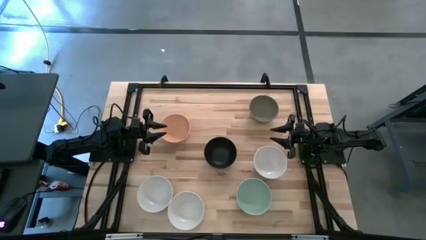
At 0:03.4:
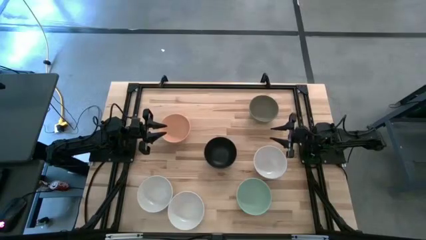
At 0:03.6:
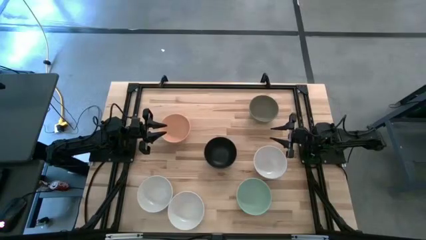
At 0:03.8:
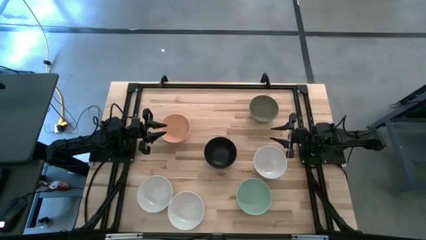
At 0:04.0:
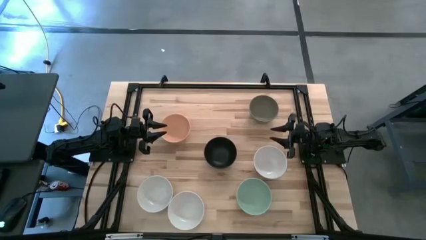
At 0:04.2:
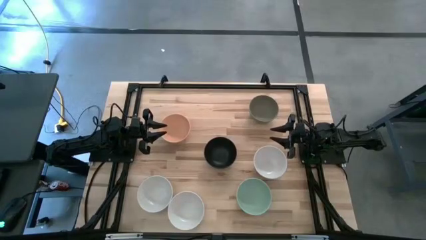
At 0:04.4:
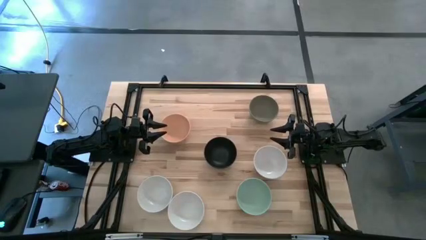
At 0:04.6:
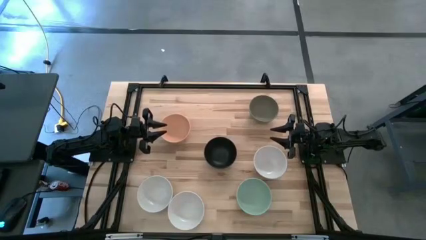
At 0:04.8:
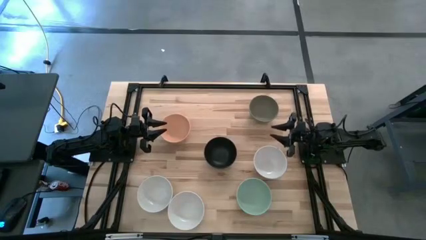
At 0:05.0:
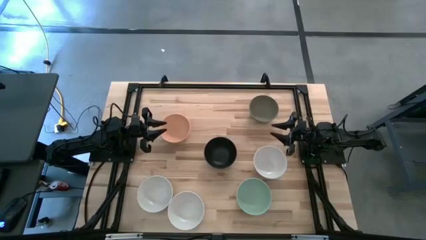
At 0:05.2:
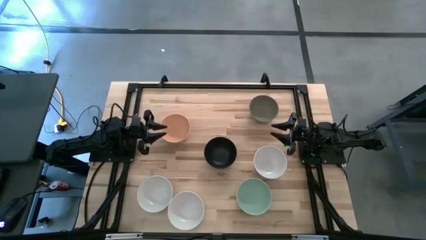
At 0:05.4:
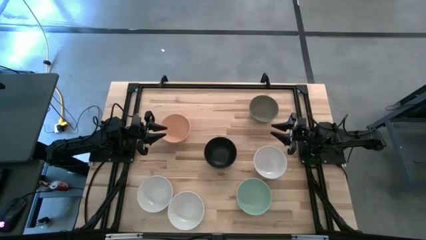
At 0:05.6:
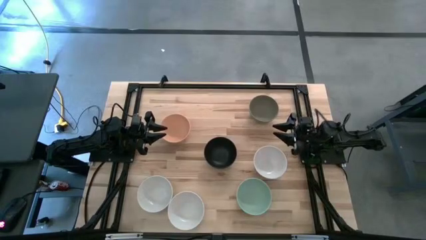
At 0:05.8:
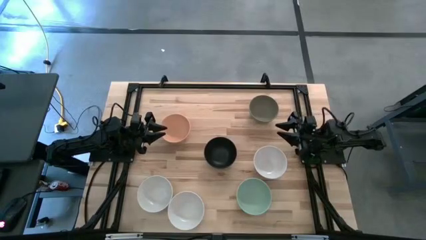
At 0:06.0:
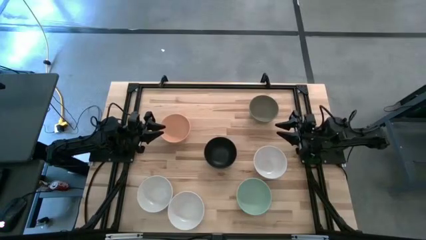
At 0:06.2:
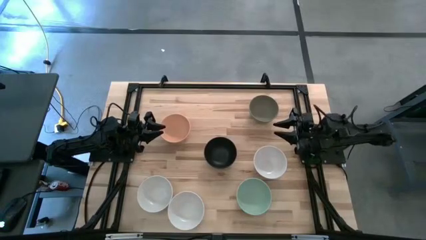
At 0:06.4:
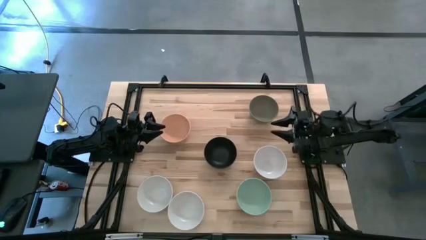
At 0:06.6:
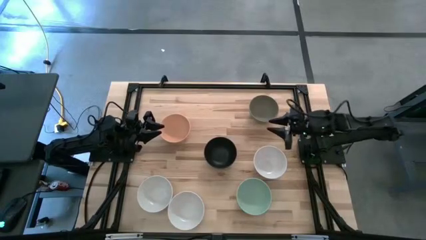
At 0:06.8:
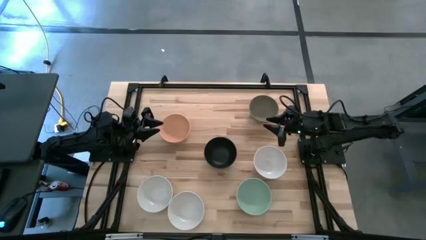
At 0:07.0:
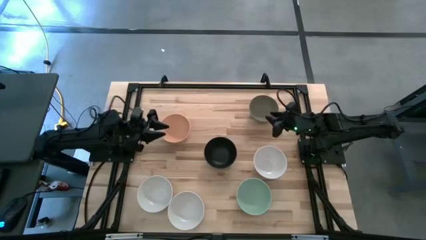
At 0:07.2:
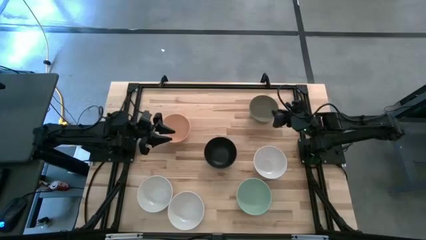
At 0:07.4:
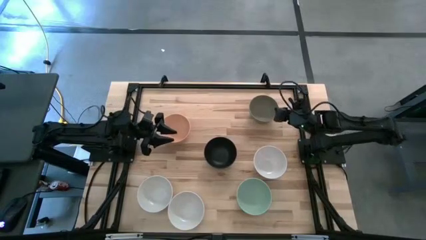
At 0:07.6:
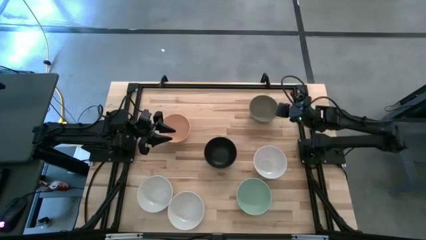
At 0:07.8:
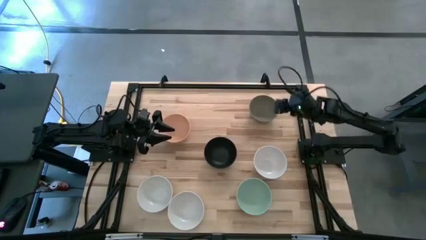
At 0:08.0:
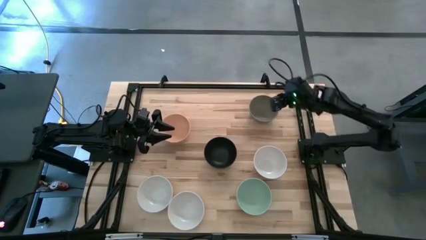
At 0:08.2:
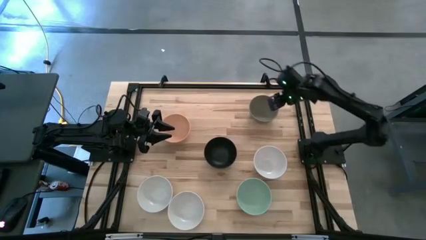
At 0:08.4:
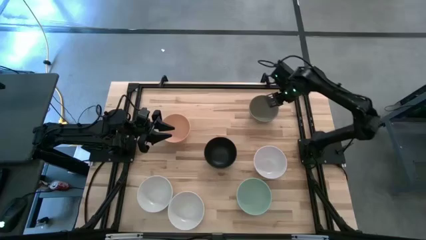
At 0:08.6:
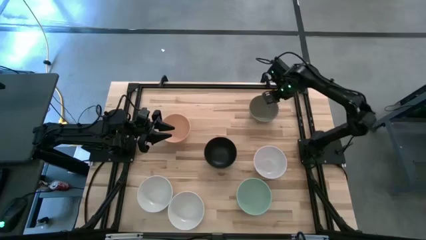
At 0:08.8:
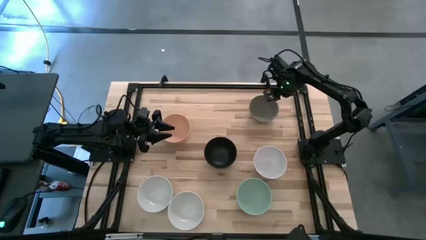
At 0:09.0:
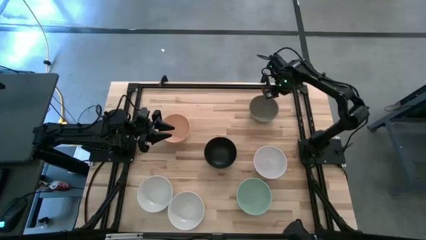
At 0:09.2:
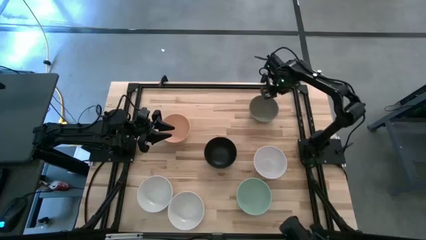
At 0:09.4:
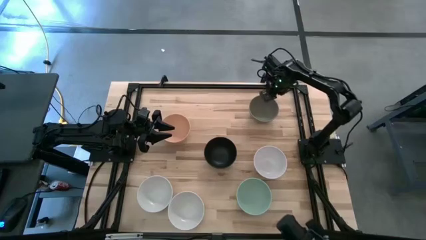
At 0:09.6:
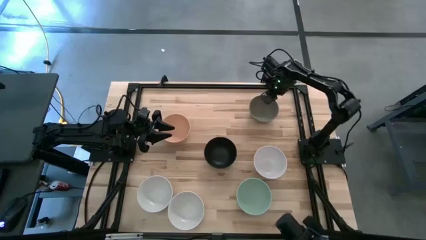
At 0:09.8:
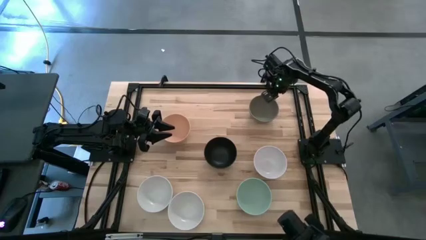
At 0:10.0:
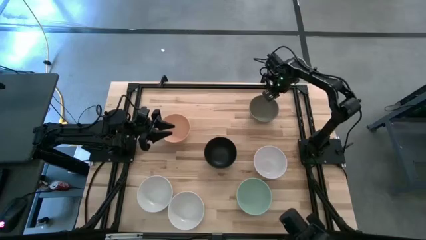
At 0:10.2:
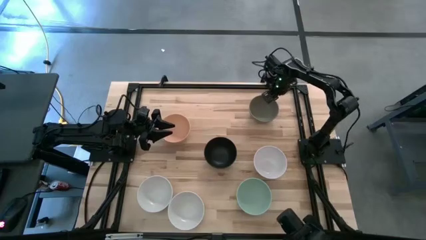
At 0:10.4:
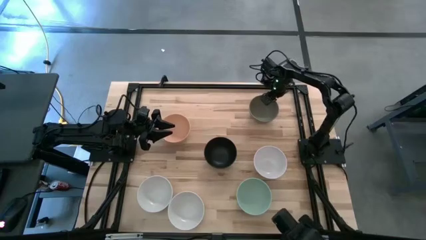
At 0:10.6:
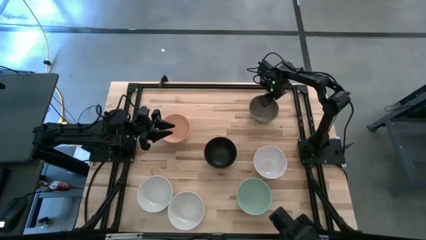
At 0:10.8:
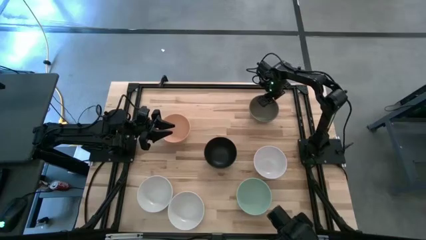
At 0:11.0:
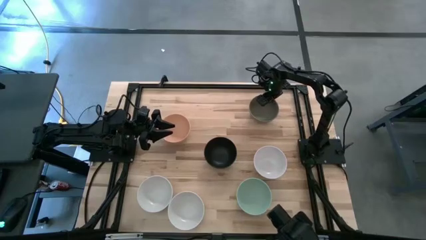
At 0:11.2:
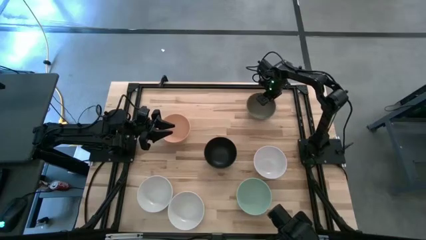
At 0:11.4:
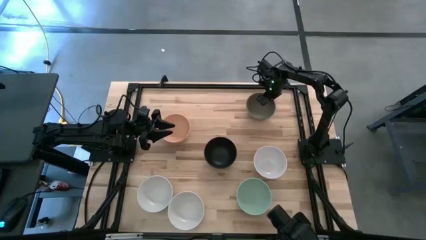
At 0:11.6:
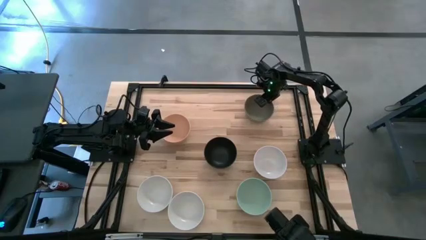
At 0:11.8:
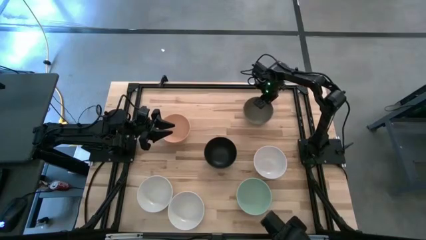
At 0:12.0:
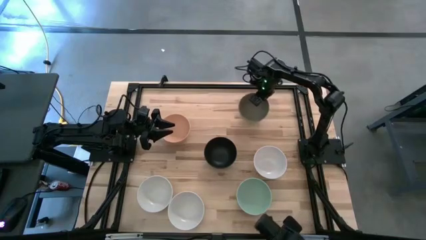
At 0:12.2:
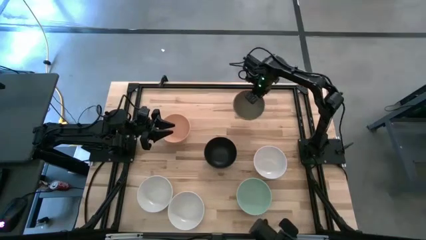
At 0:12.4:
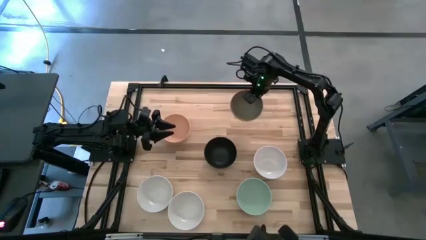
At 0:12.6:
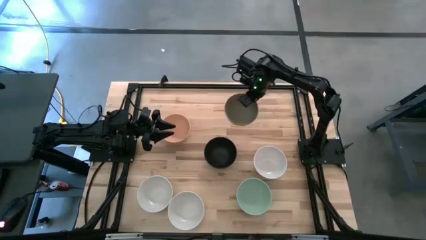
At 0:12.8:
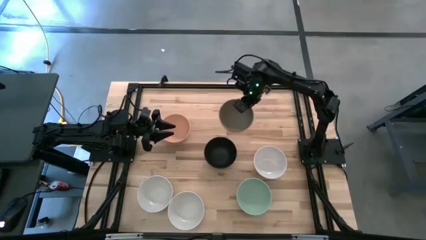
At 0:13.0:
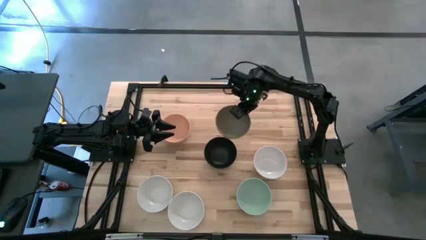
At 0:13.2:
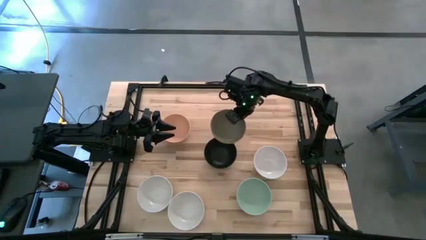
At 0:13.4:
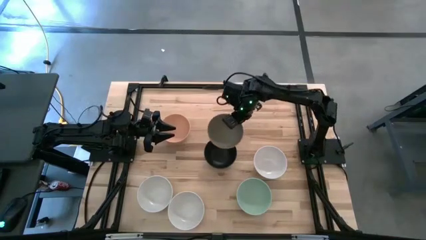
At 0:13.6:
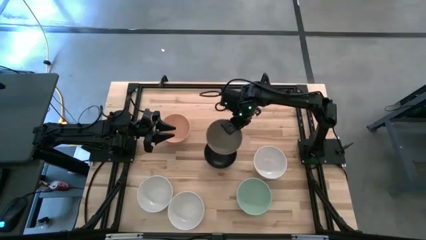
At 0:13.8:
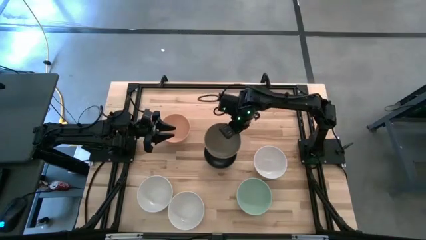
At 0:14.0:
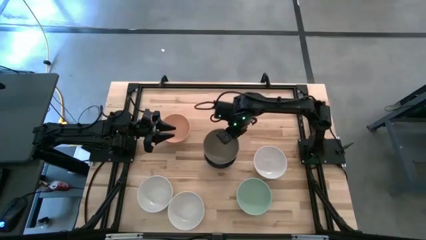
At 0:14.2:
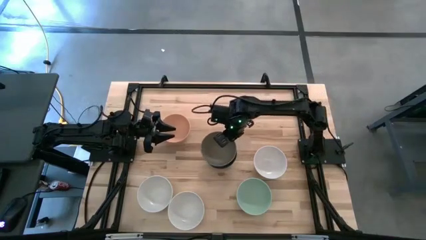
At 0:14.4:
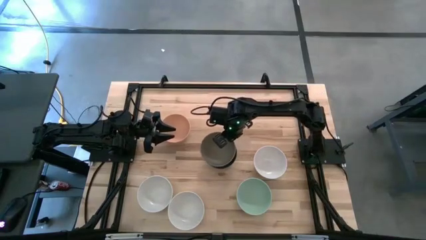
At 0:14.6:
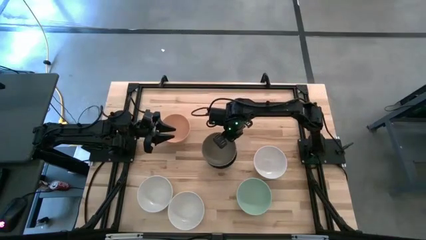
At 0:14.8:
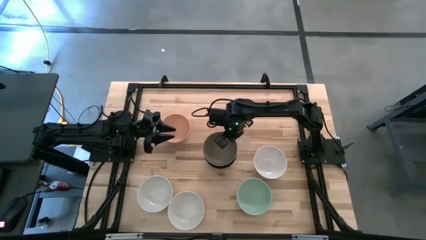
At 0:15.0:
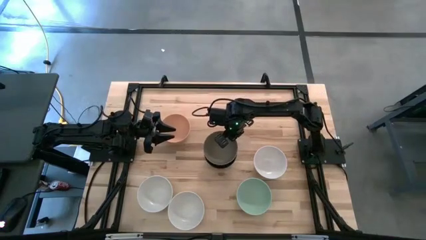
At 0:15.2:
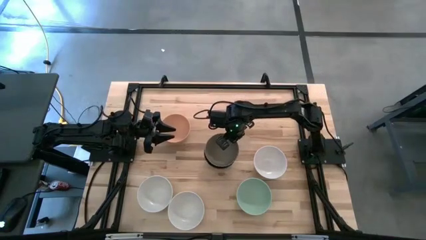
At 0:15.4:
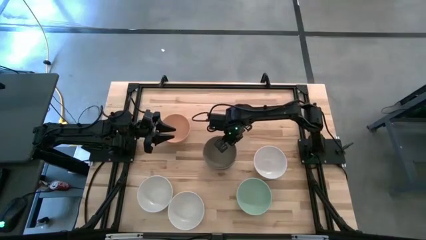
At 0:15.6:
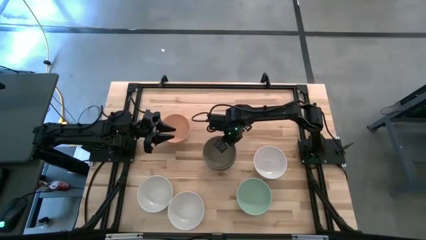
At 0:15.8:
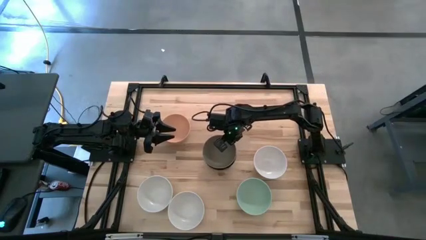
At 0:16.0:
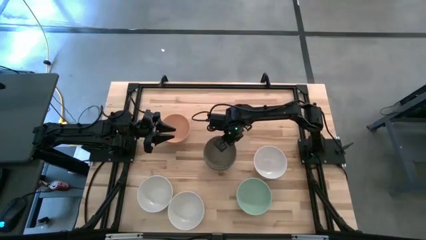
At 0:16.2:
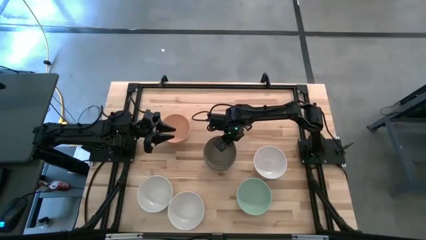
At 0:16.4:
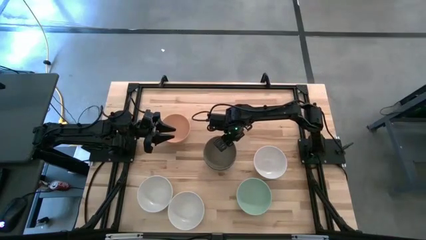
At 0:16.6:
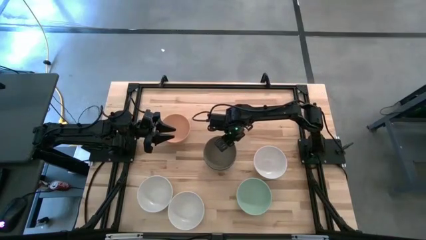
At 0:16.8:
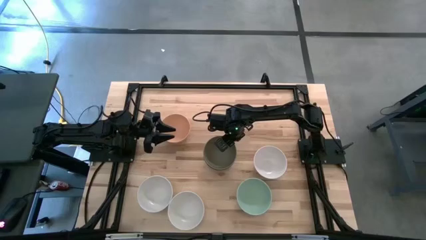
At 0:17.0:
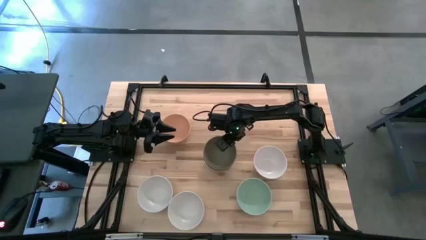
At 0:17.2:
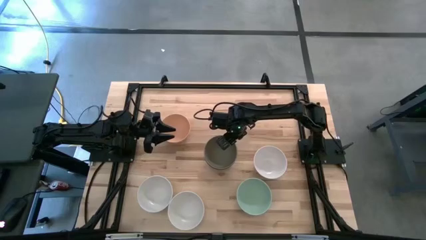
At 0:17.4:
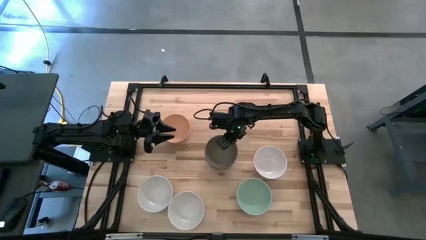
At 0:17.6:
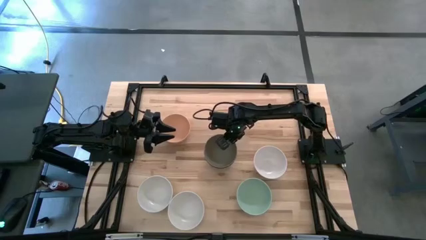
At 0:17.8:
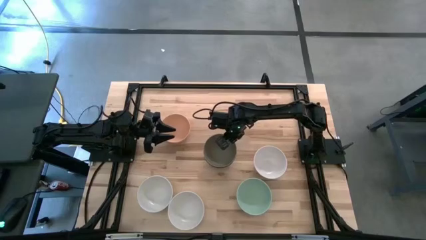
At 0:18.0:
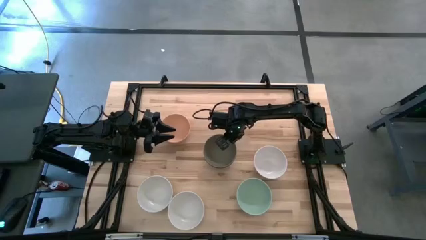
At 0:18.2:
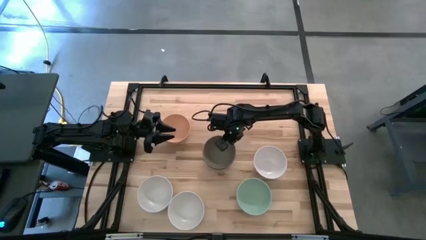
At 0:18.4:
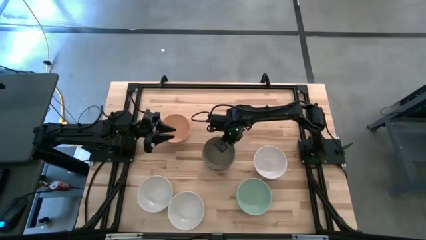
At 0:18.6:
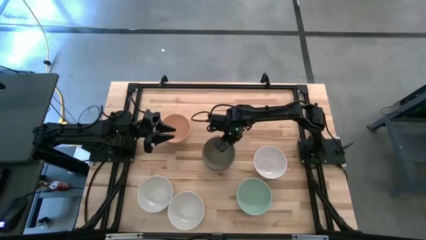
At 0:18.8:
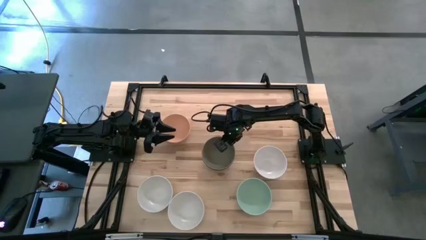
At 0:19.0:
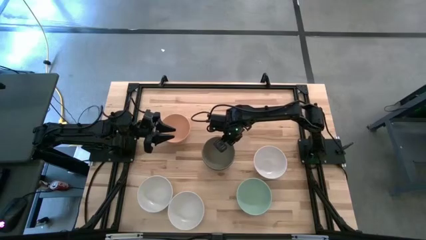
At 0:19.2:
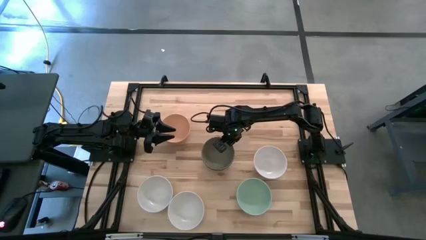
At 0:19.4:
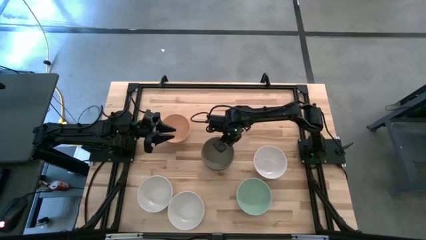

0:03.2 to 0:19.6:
Task: Nest bowls inside each other
Stack the gray bowl on the black bowl
